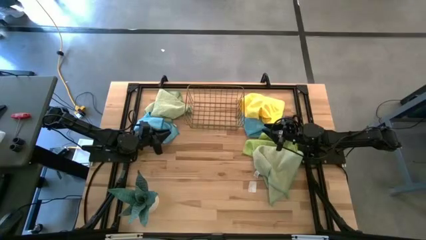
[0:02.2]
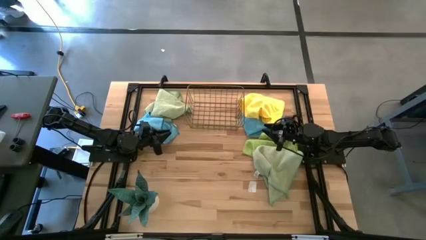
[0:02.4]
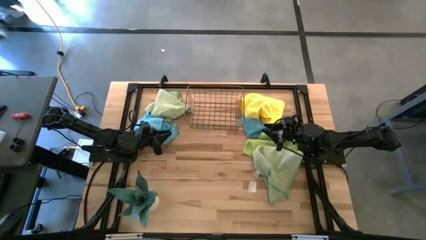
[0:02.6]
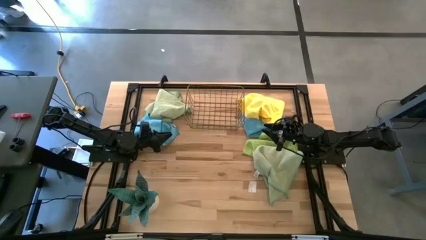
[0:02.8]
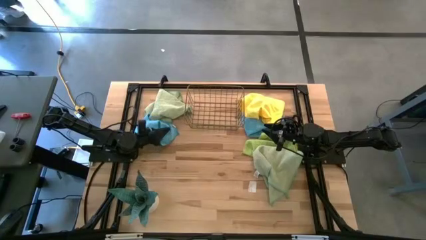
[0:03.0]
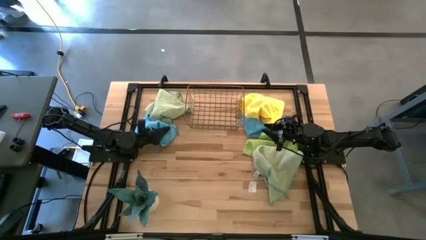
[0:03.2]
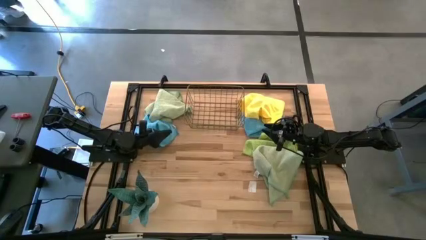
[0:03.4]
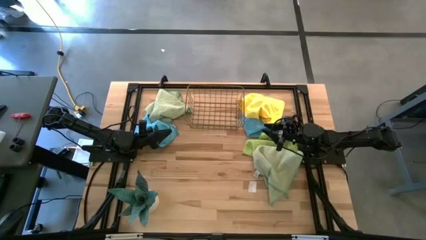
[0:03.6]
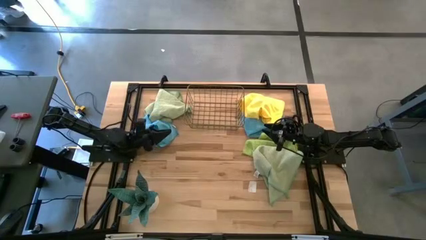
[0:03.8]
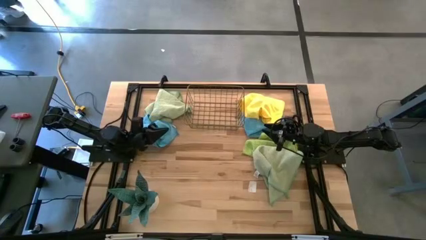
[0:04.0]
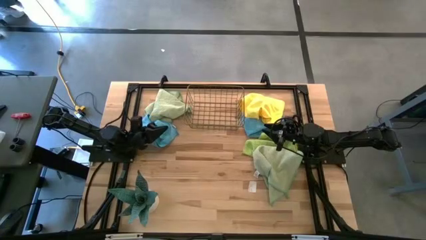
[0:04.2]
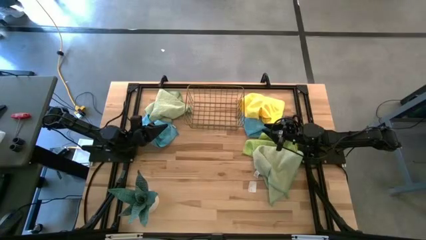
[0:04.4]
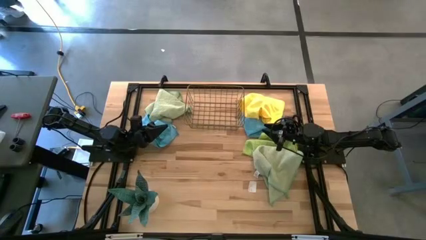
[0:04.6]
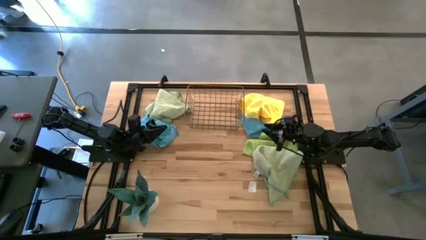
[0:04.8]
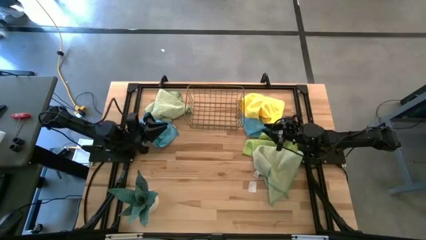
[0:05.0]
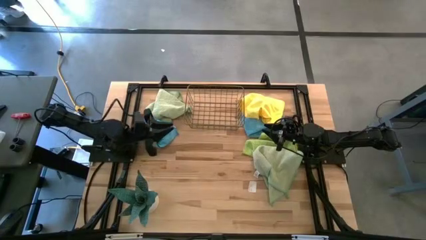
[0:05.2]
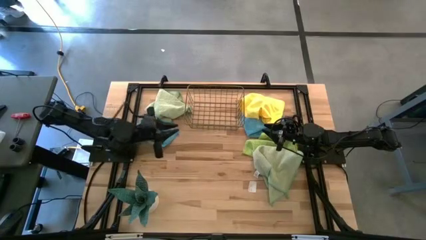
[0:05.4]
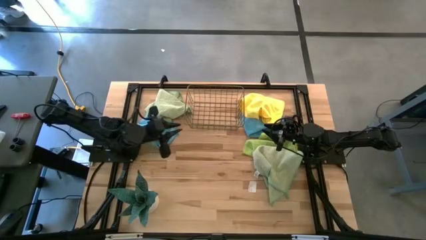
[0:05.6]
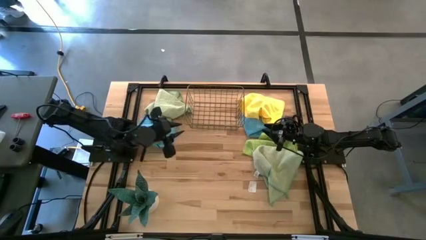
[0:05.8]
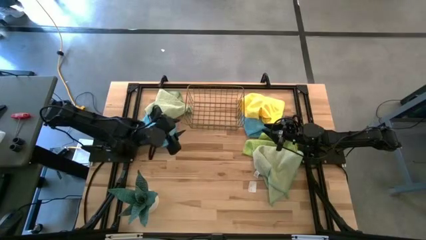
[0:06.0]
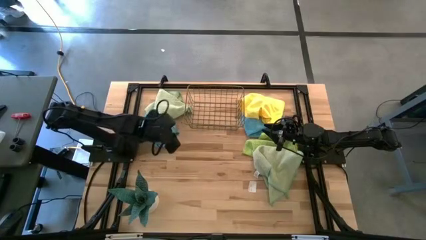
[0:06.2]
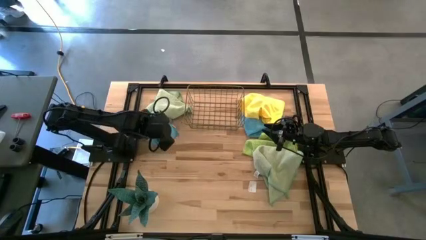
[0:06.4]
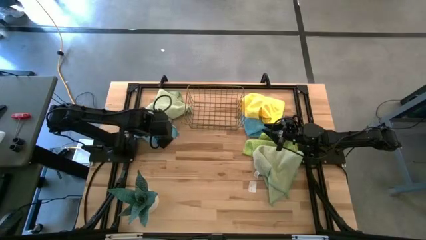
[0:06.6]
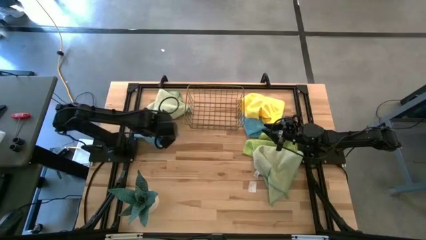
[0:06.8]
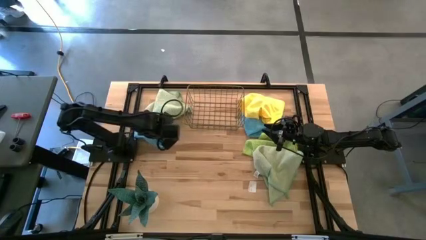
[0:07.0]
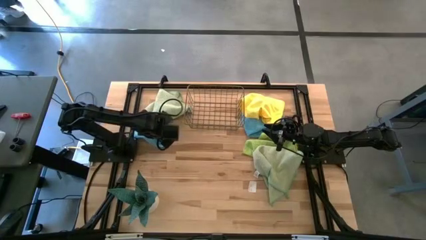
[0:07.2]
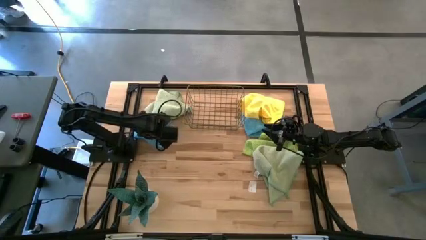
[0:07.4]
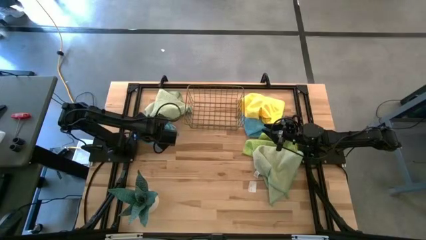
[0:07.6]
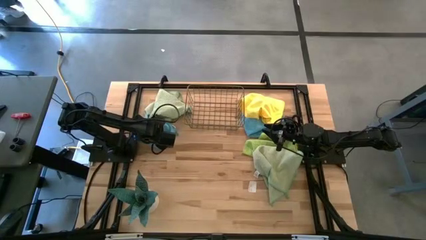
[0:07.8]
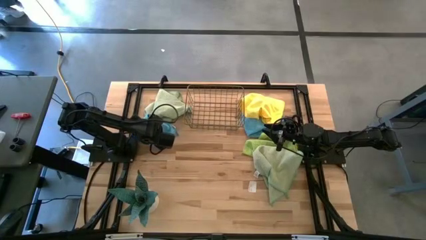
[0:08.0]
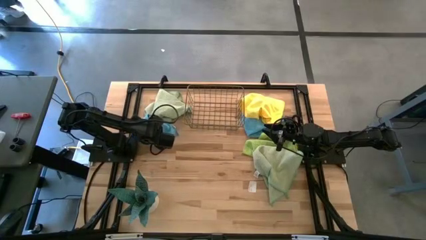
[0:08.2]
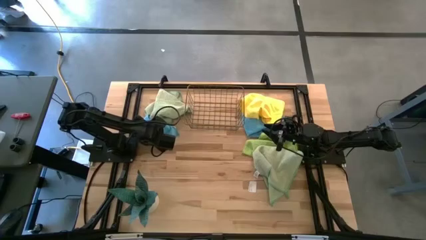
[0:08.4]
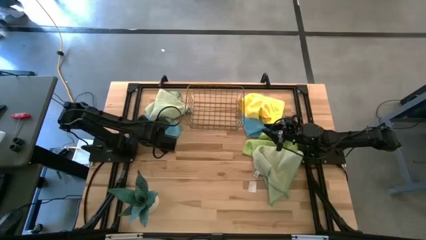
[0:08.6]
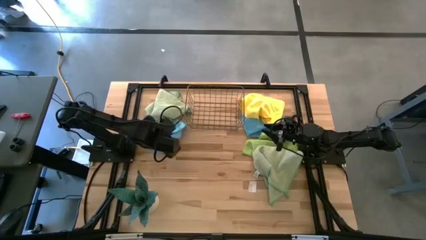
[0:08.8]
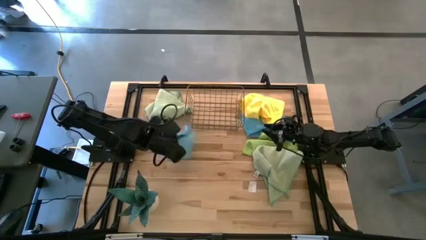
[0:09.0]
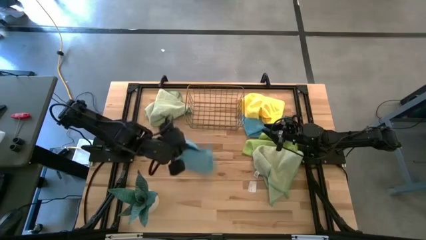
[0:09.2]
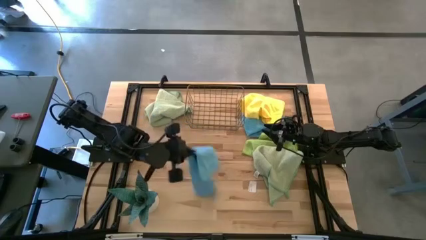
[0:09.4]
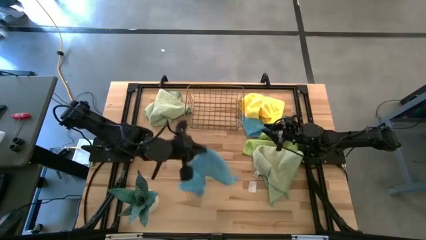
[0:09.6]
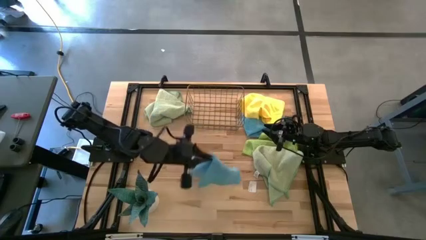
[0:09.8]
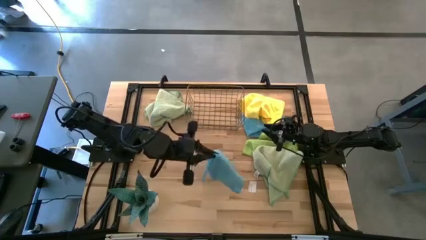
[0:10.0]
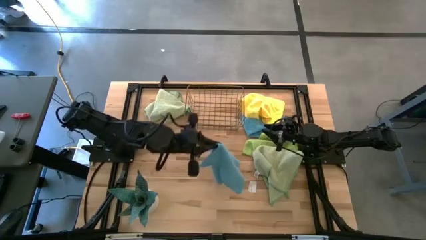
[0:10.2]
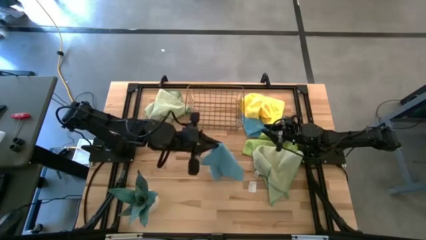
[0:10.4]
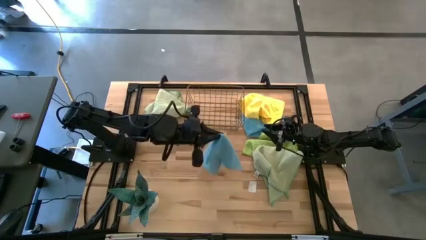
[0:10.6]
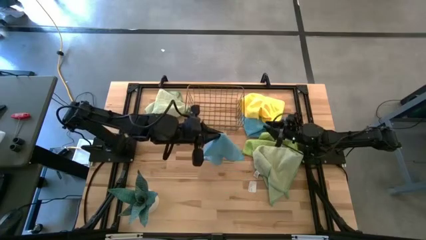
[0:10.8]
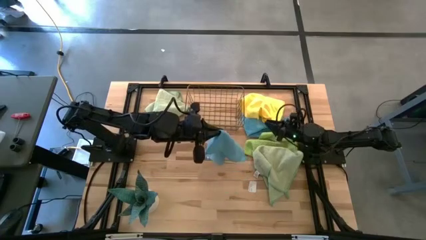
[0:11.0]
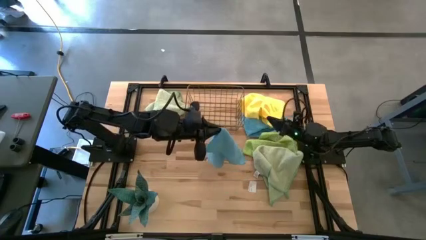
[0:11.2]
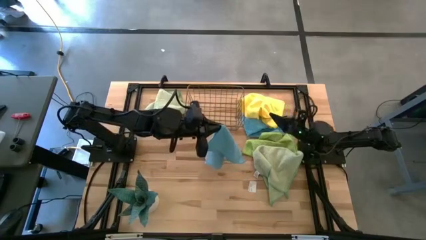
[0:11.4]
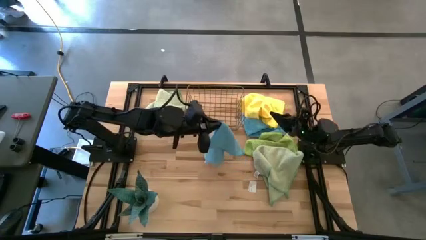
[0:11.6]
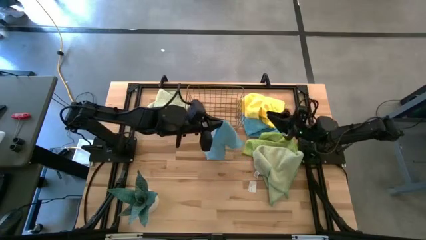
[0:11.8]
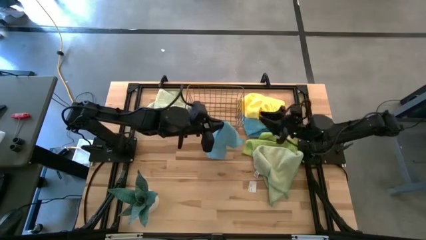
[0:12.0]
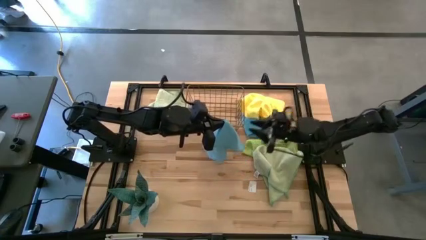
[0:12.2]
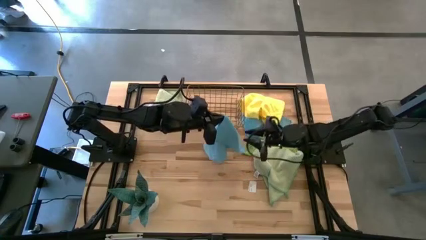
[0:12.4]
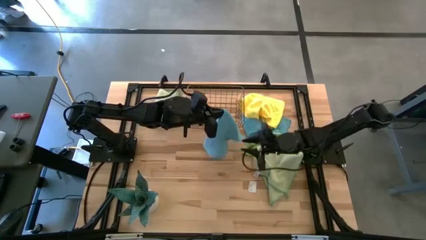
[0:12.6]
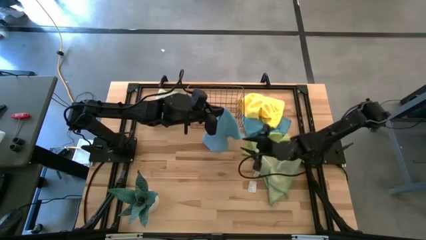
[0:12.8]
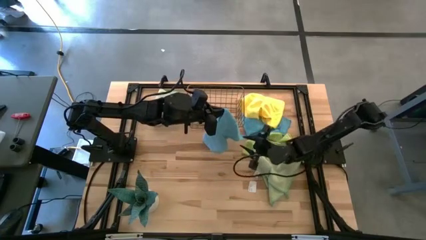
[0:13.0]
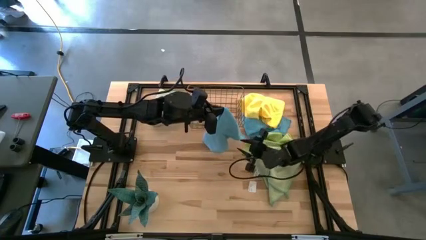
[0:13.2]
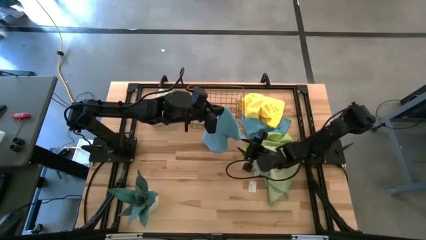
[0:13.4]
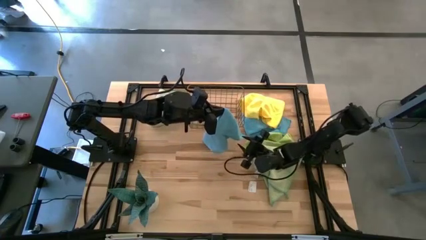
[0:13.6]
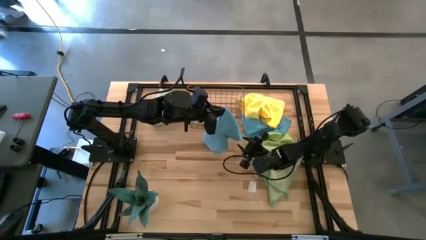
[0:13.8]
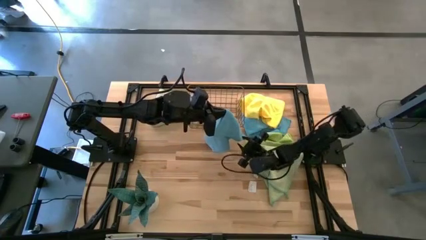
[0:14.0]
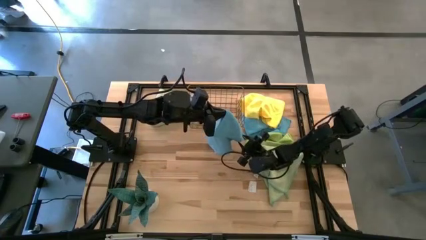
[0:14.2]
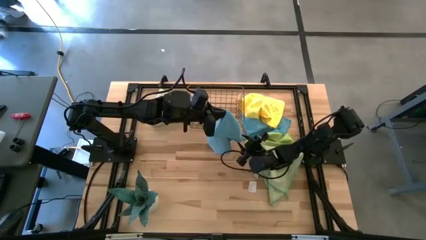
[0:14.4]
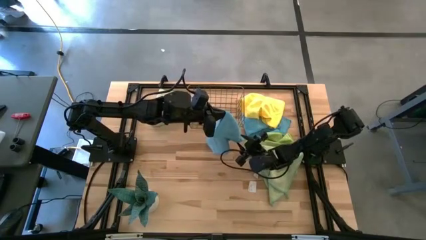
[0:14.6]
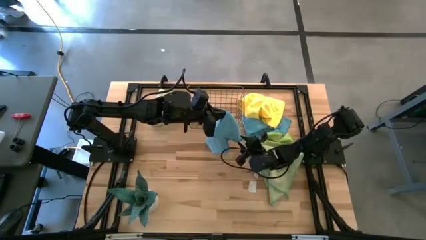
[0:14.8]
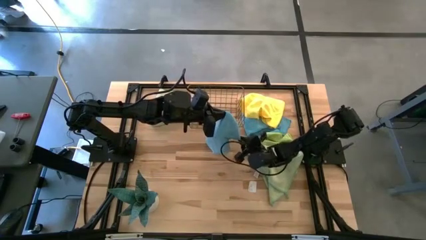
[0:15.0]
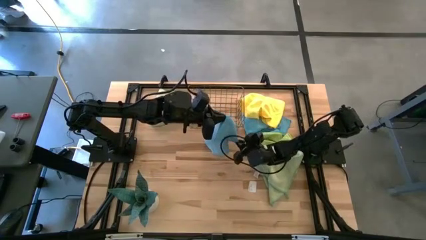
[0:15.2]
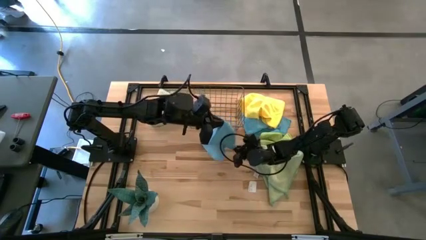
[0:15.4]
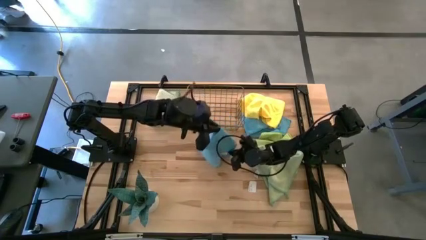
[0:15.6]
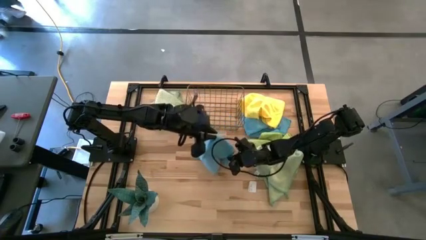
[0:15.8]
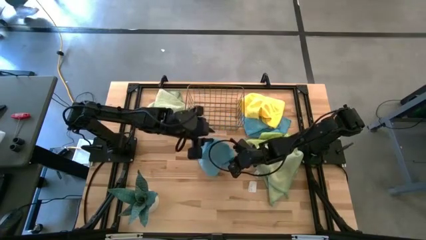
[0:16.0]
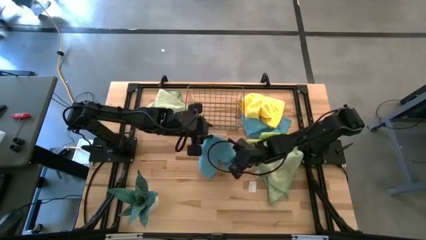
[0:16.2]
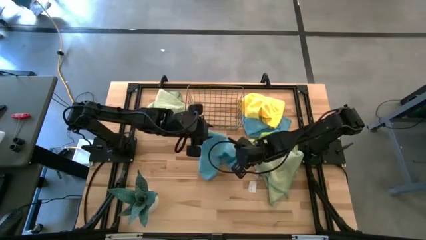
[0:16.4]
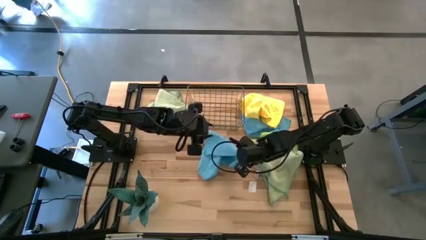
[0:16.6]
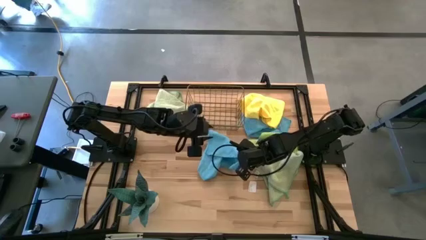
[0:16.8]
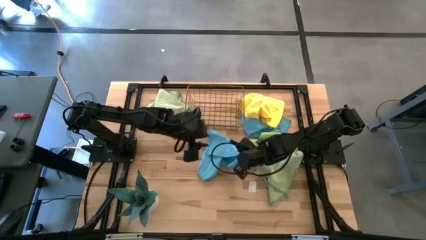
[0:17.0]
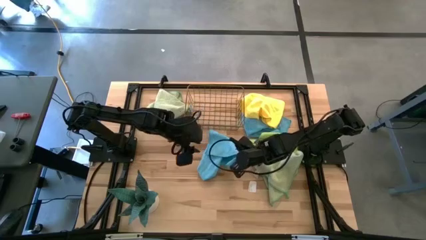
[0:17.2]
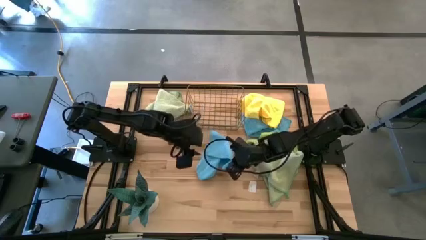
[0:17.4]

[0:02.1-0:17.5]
Task: Fold microfiber towels
Fold the left blue towel
